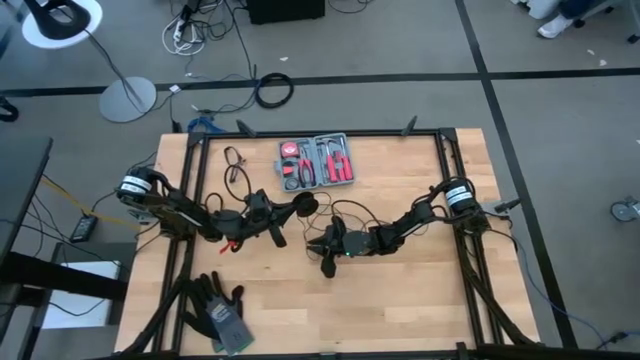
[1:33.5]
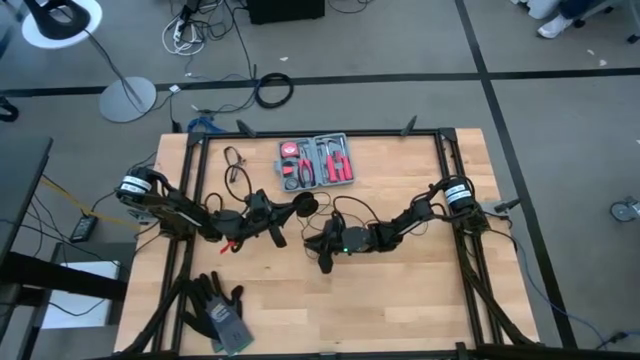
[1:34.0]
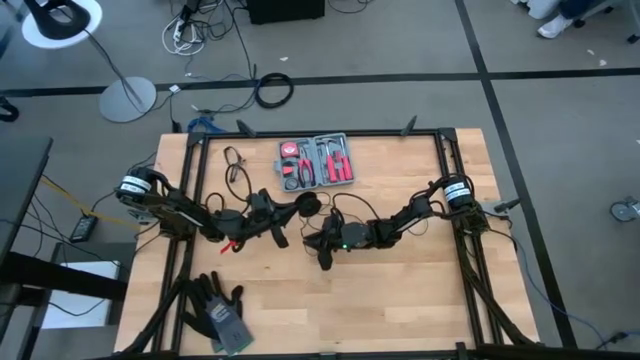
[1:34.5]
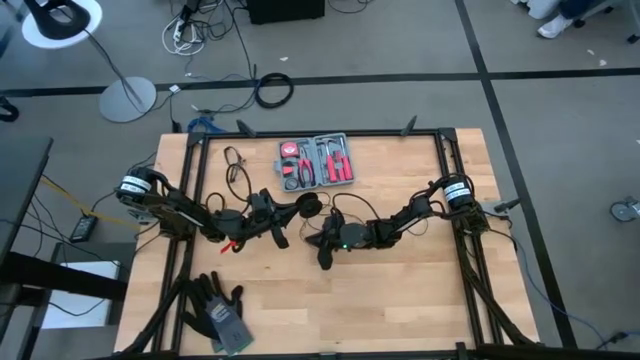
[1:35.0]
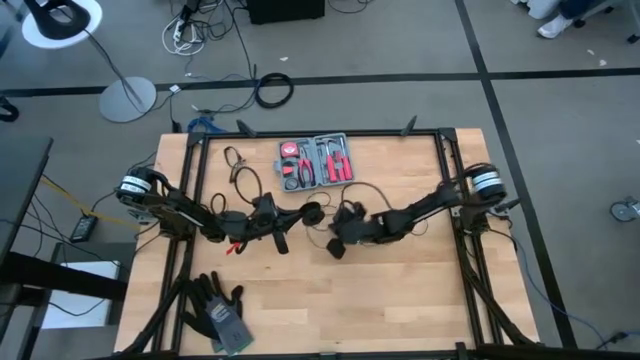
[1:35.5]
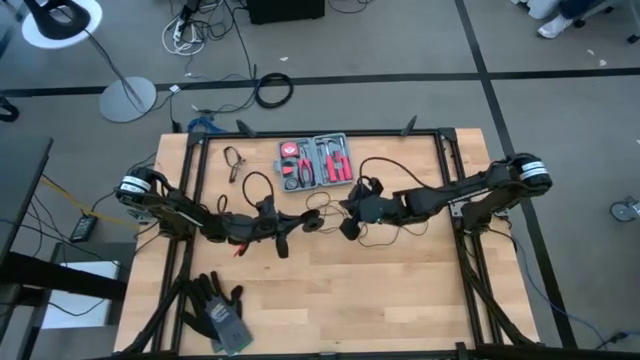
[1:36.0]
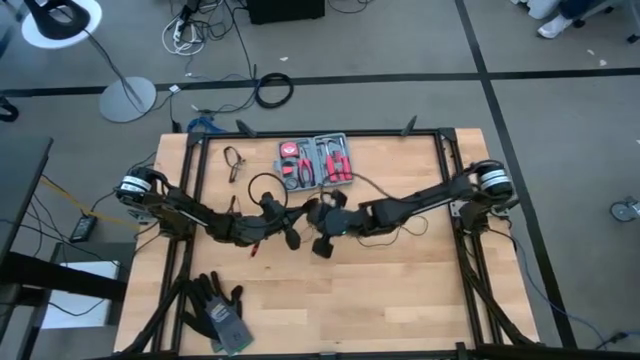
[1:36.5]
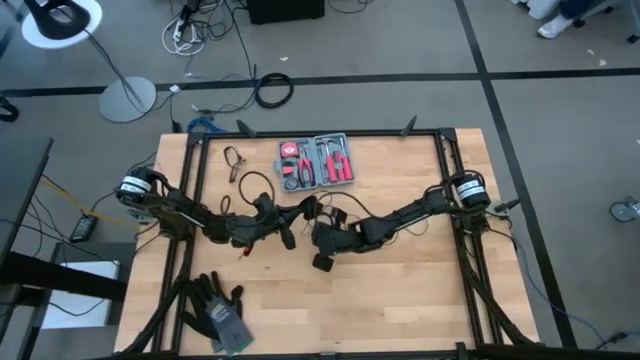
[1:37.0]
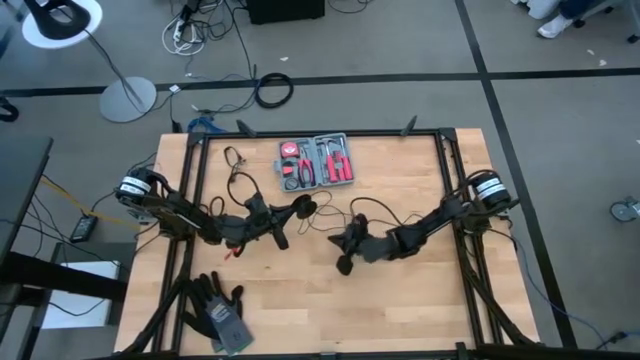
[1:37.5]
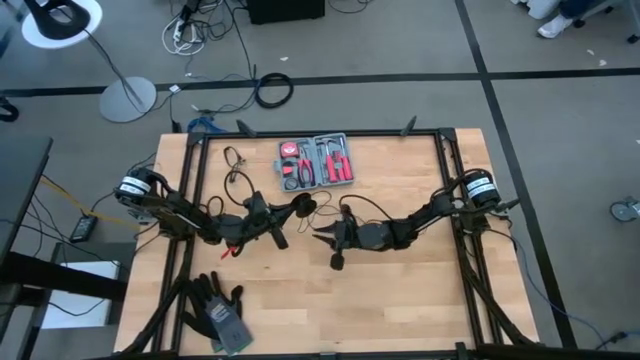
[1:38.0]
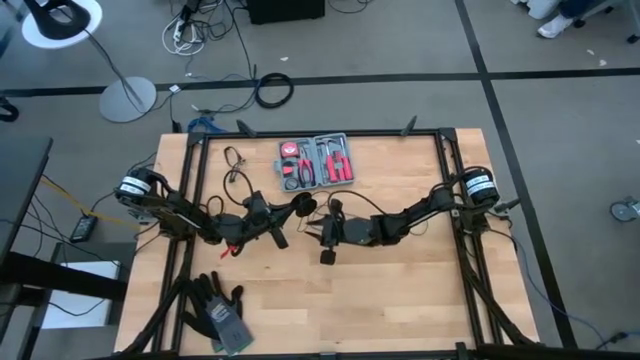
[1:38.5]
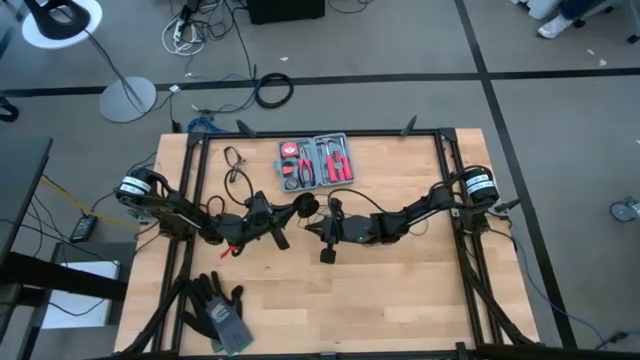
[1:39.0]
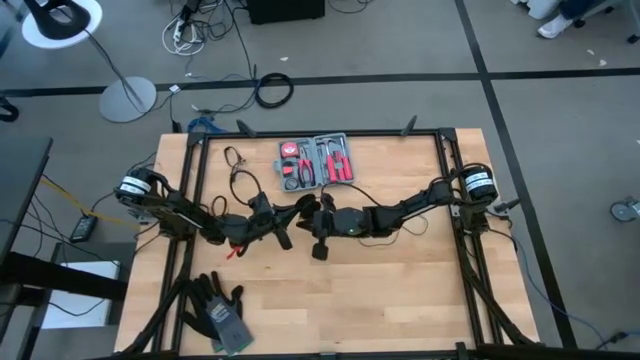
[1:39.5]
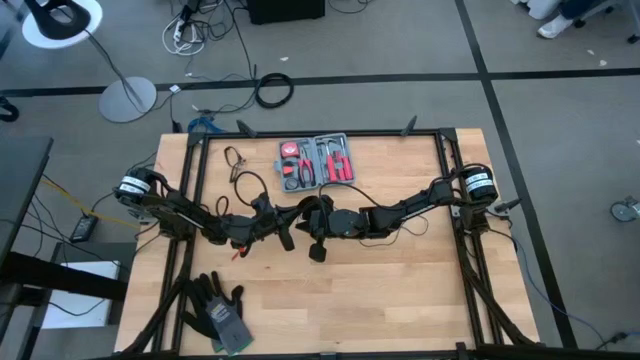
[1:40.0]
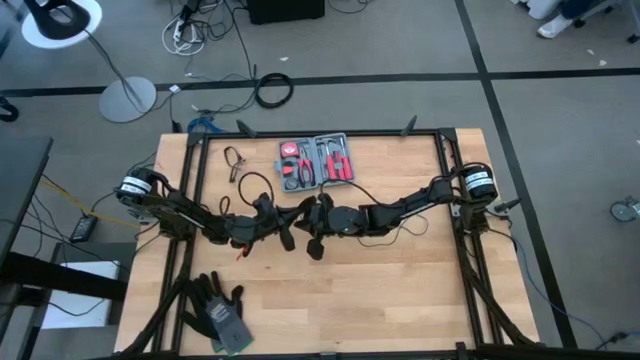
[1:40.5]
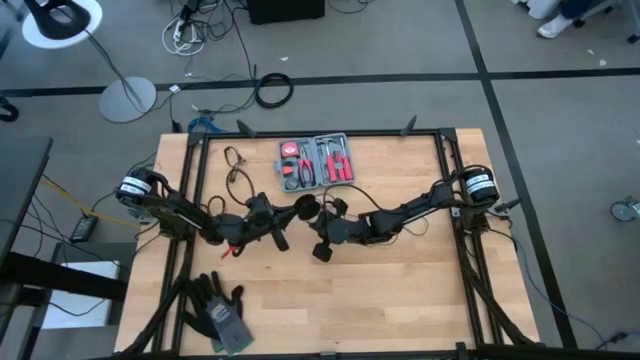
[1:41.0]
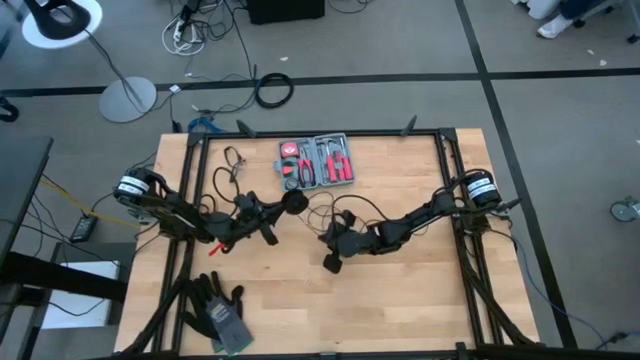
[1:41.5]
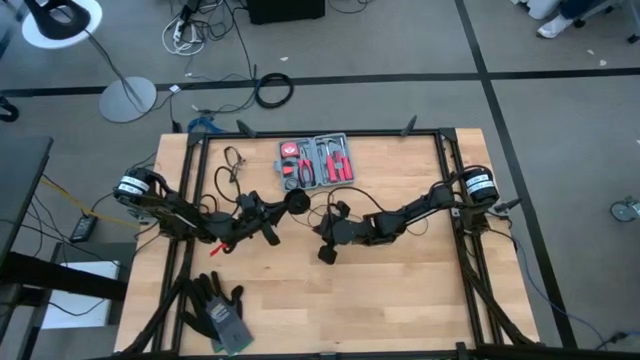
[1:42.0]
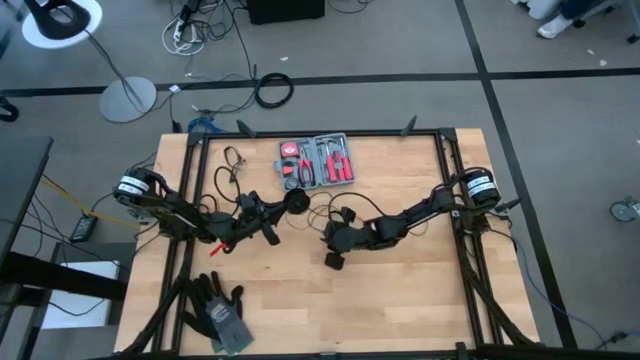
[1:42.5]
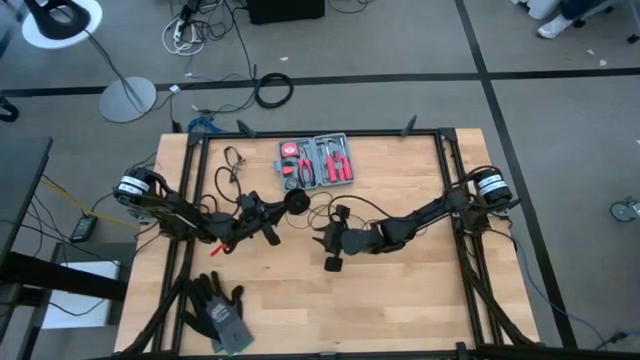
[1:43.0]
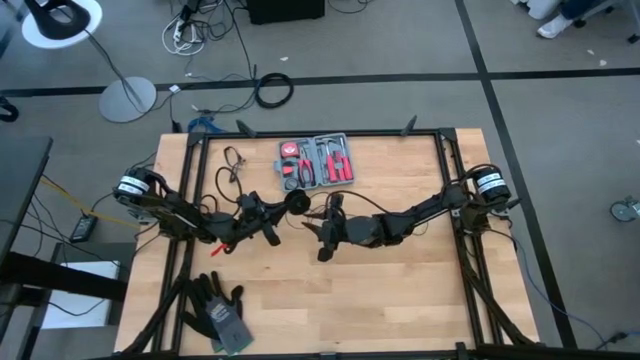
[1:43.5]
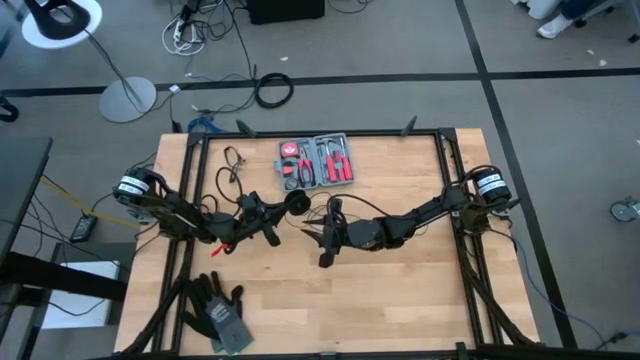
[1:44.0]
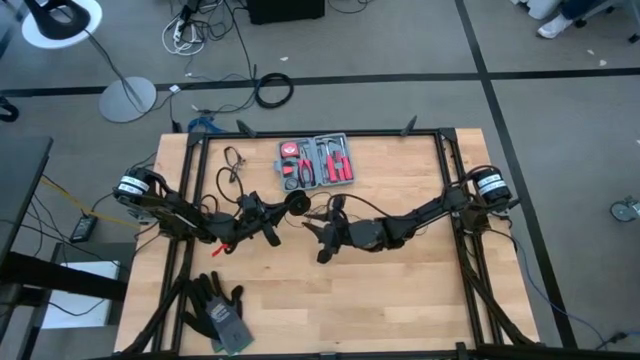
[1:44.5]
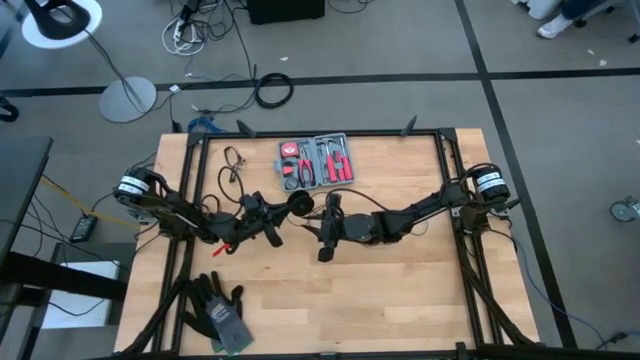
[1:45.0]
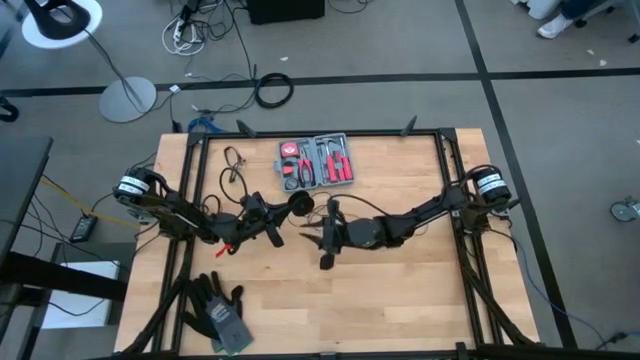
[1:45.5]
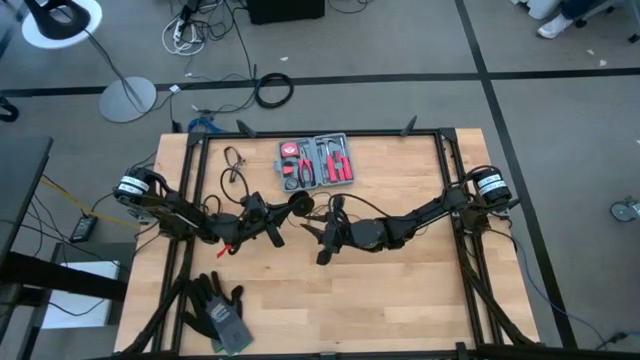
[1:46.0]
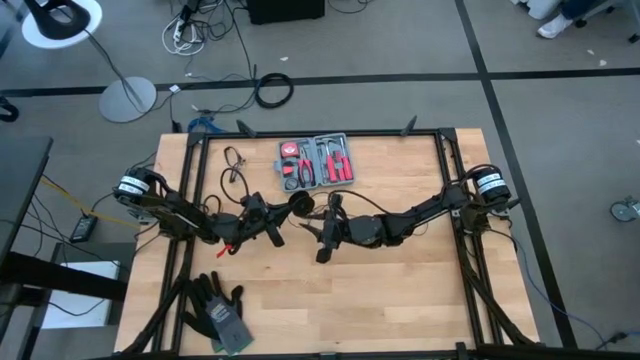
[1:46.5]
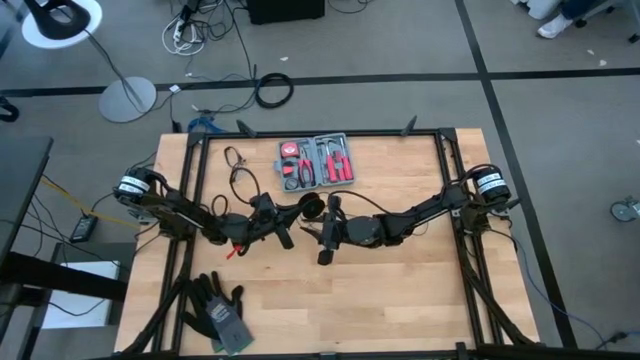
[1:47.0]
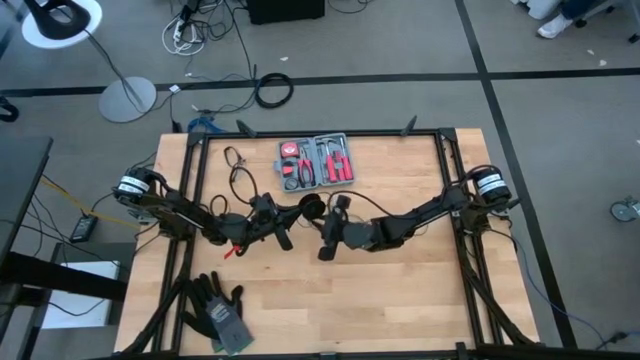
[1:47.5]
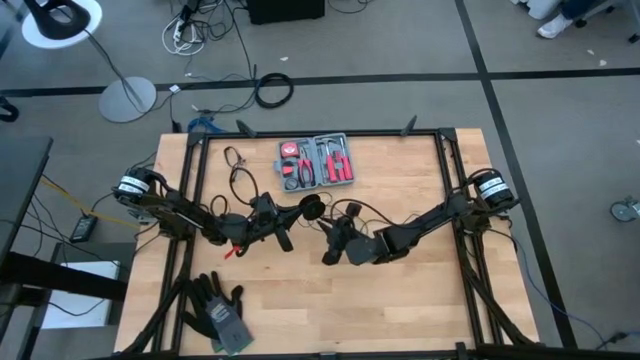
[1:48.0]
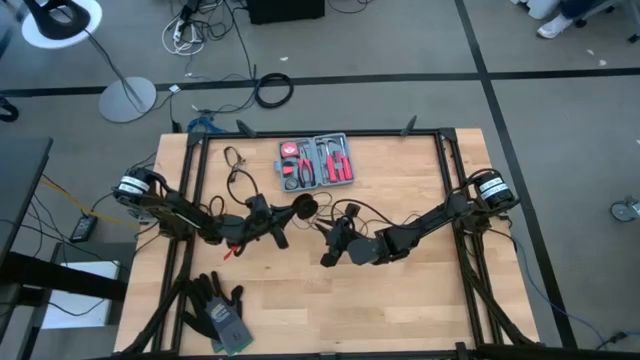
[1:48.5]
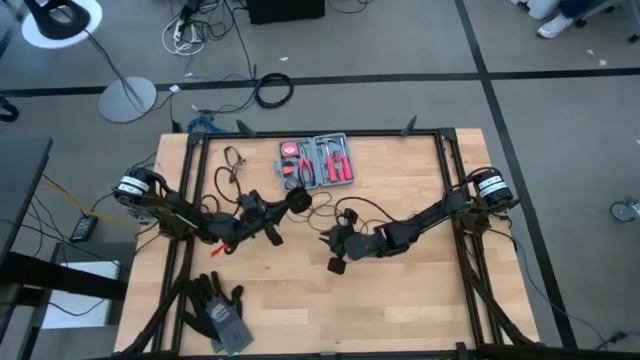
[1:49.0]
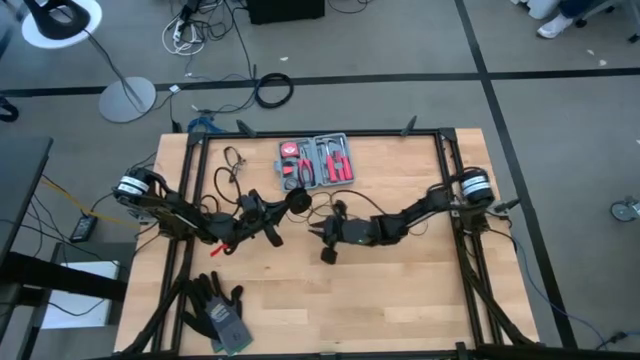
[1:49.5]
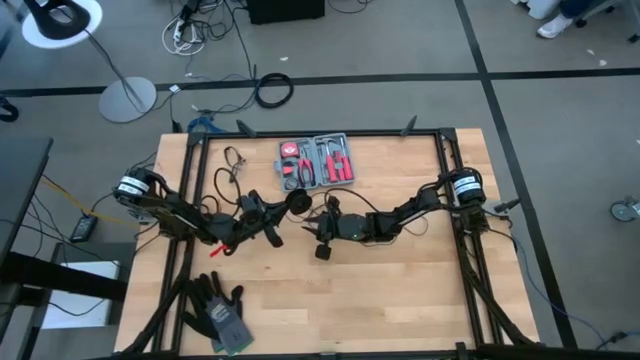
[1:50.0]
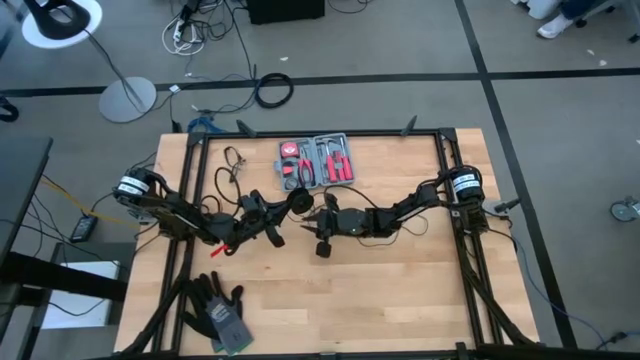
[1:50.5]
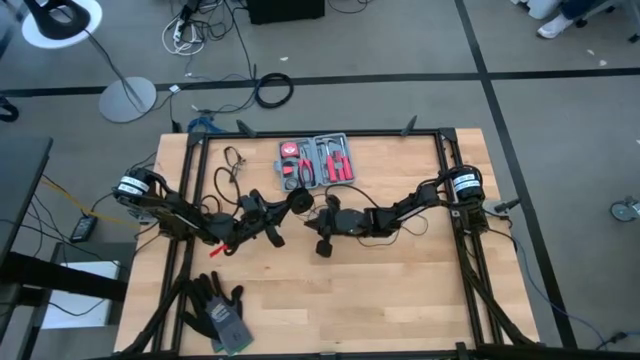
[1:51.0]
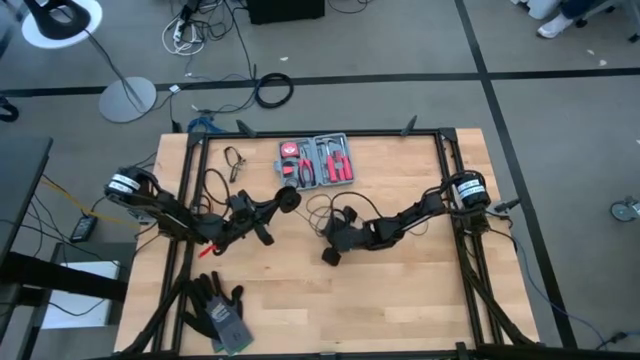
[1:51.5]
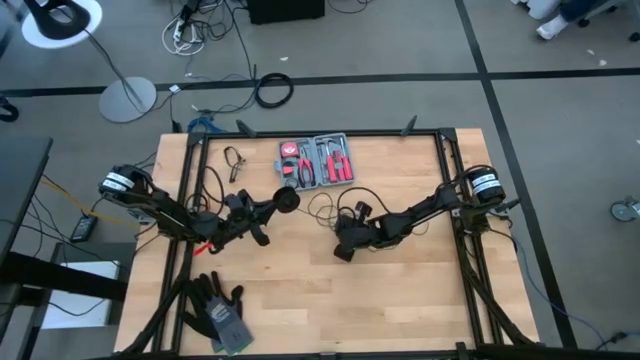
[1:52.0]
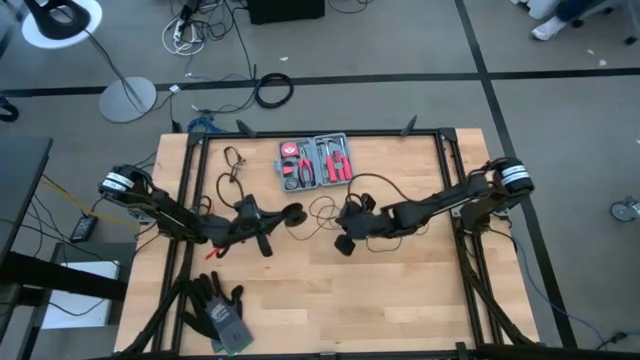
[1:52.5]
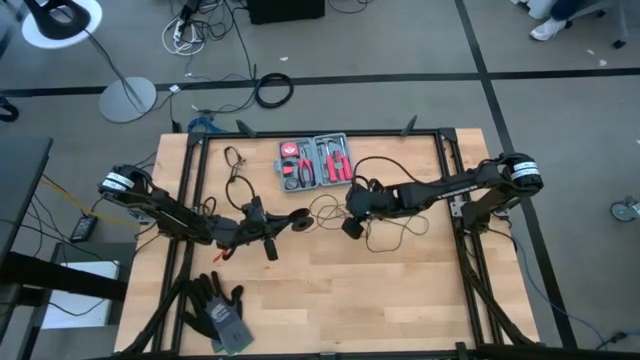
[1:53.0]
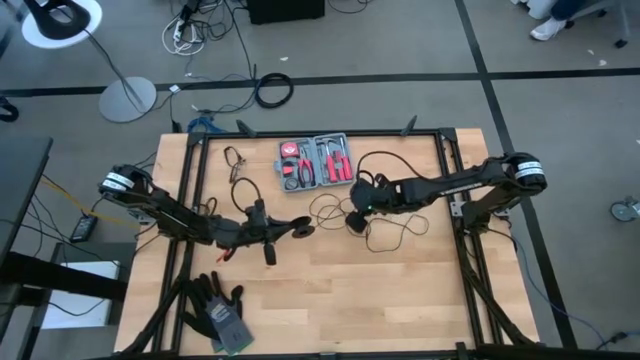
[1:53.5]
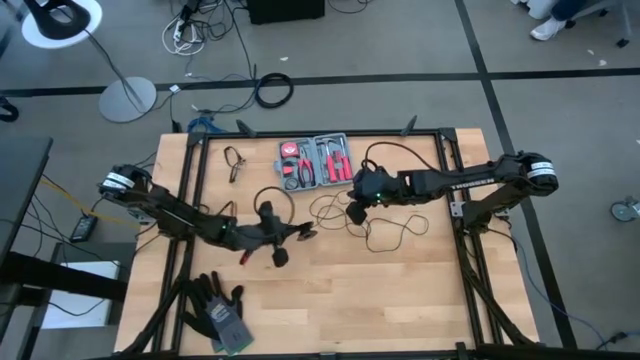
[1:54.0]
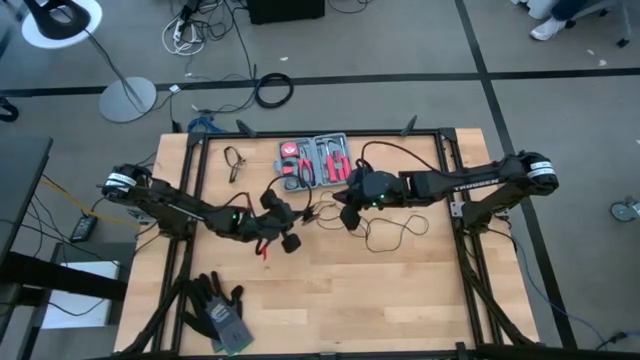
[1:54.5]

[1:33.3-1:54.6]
Task: Coil cords
Coil the black wire onto the black spool

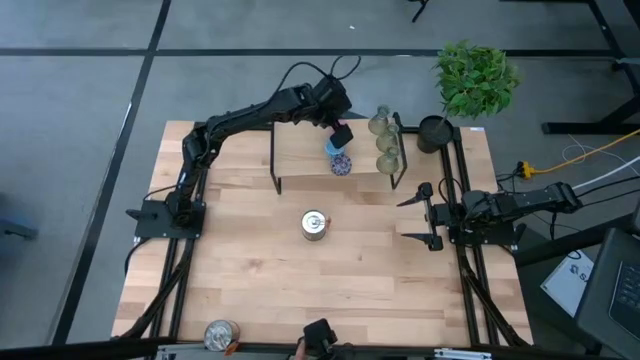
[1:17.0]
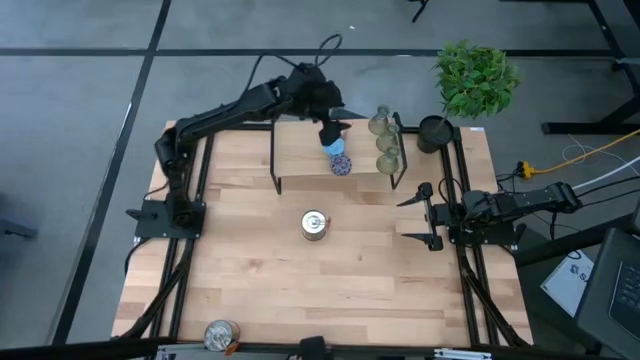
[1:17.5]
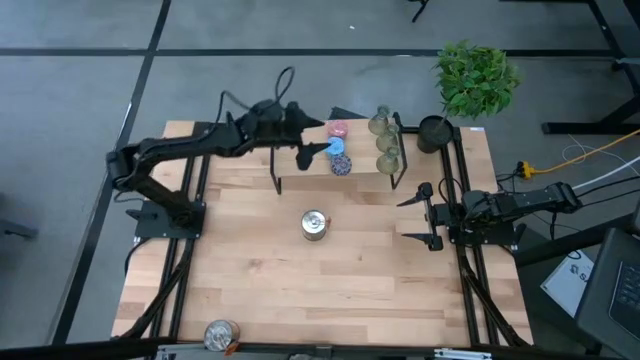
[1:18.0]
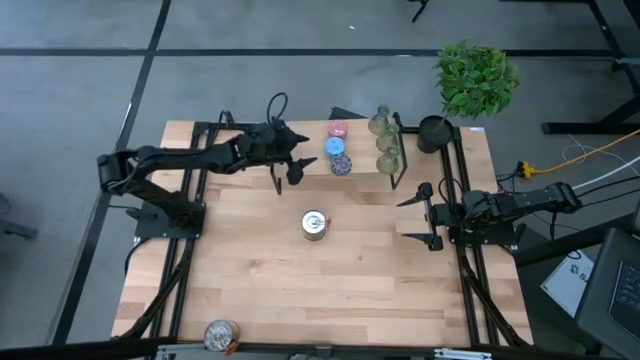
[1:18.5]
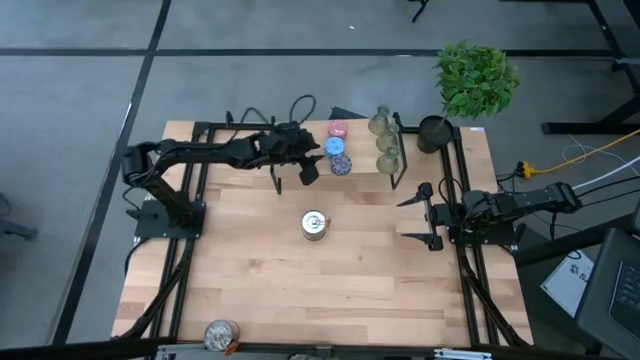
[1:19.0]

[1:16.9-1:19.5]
Task: Pick & Place candle stick holders
Adjust the blue scented candles on the shelf
